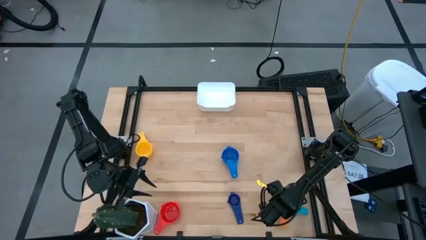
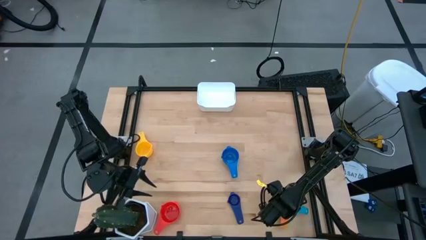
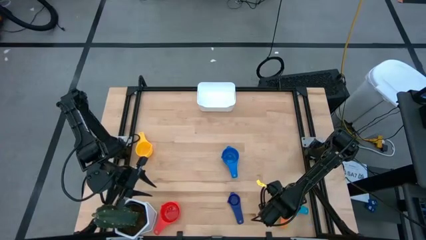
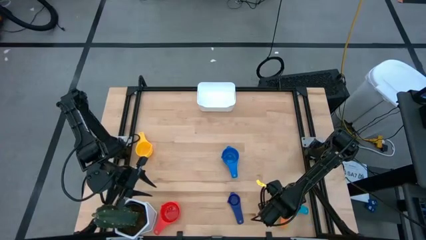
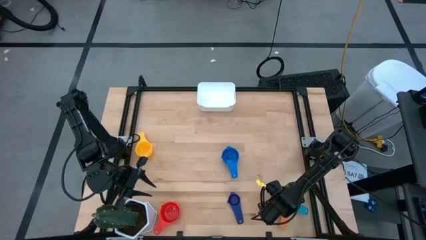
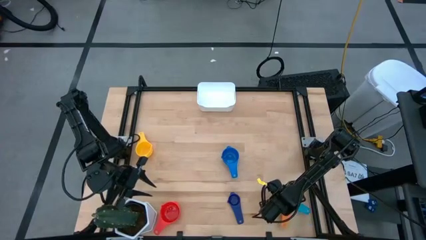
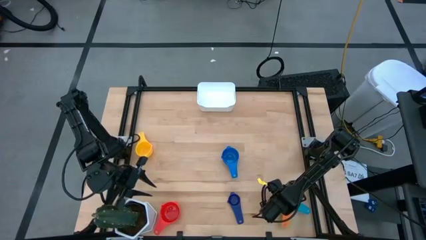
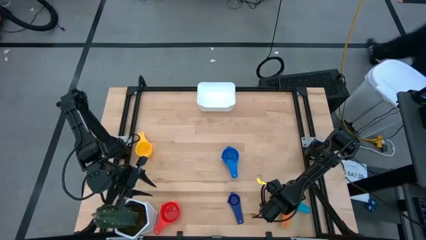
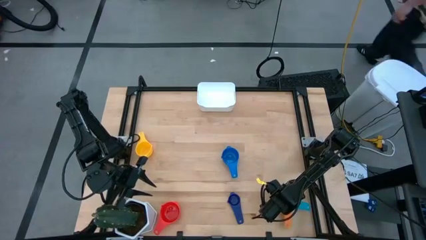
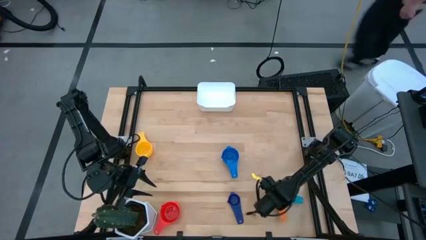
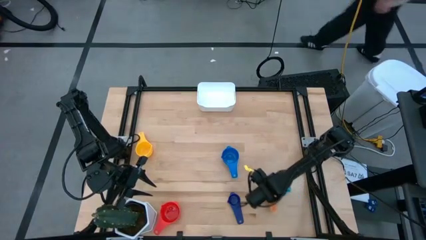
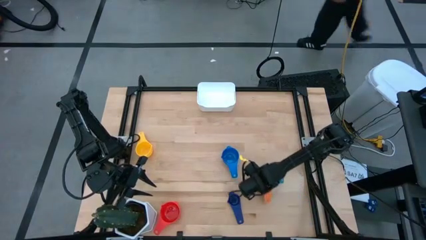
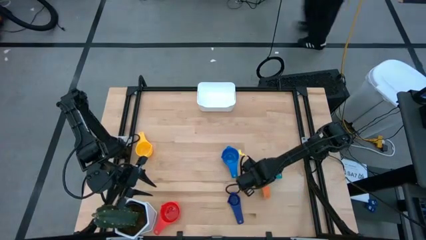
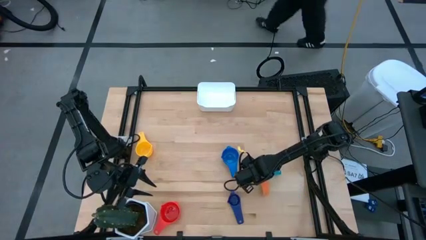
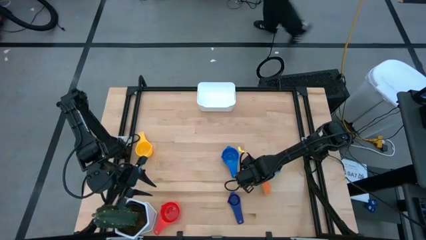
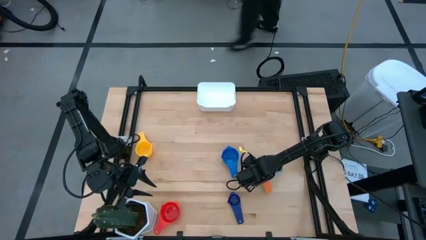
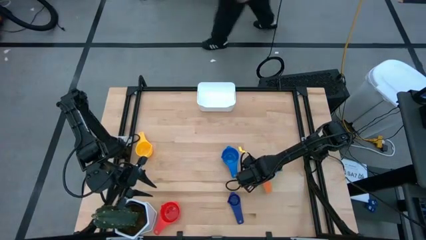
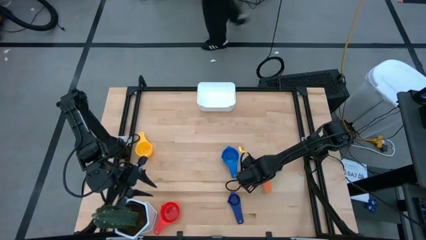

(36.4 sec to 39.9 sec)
Task: Nest measuring cups in basket
Move the nested measuring cups to the middle of the table

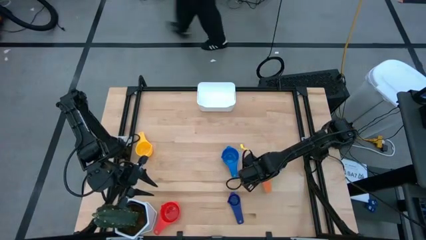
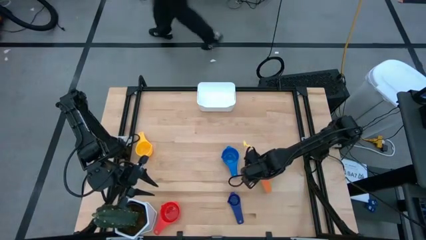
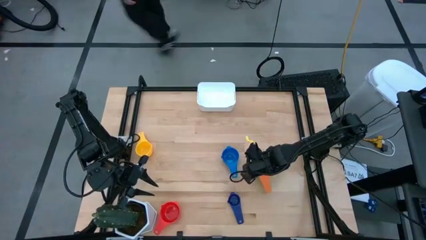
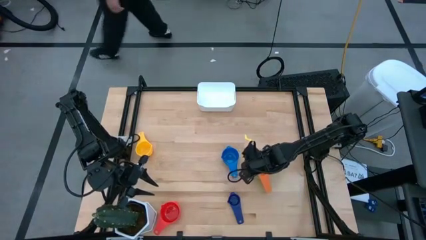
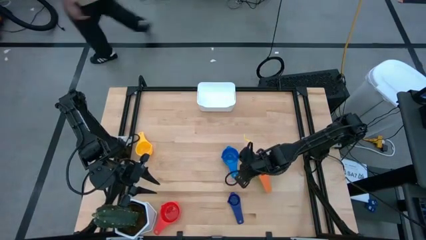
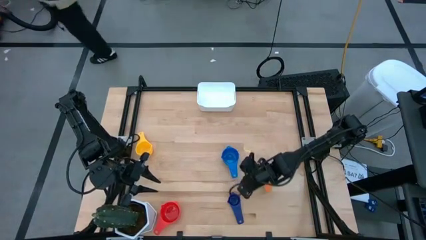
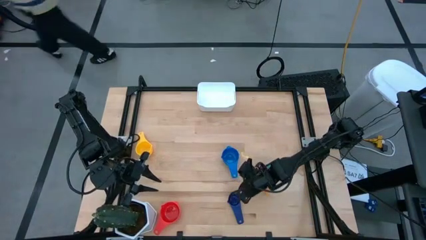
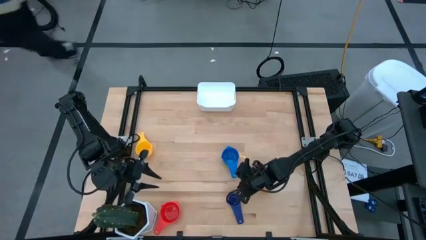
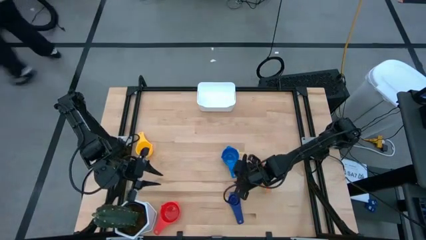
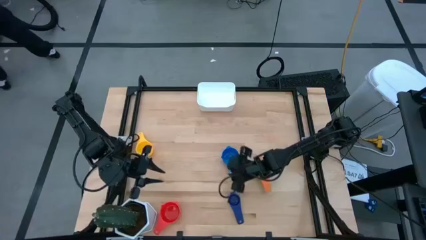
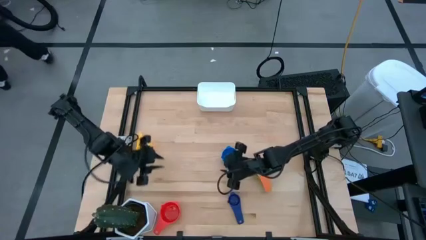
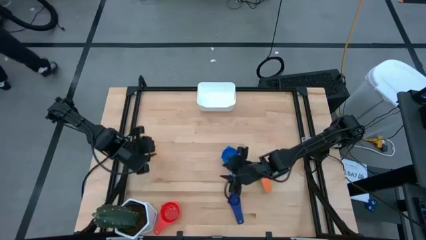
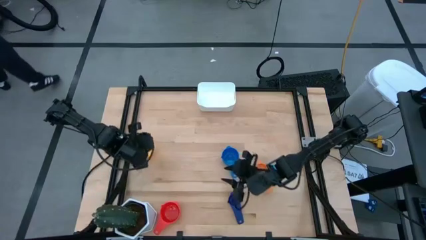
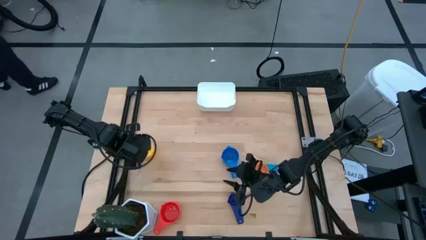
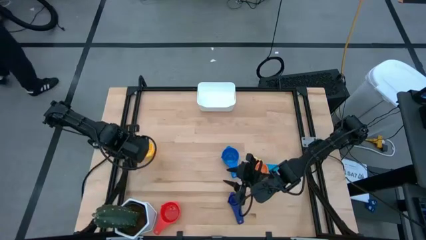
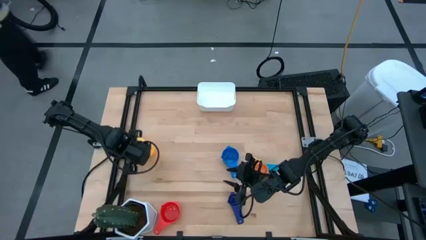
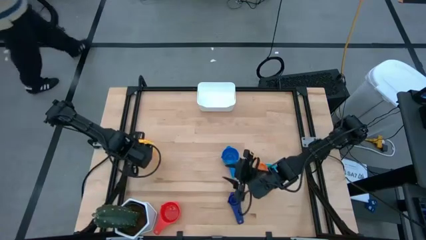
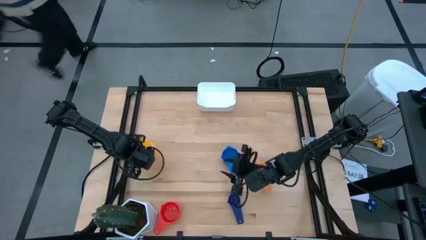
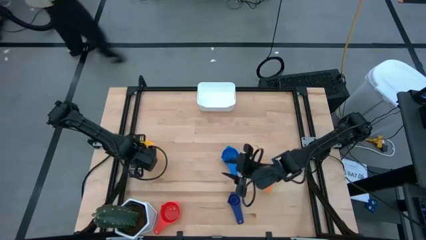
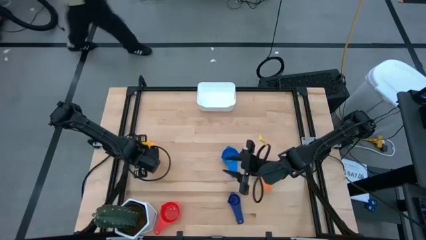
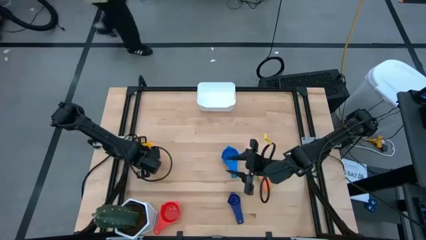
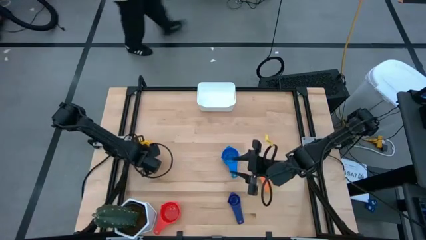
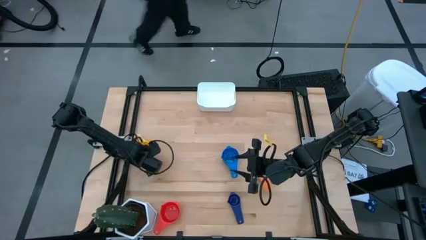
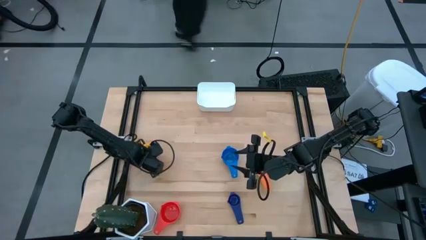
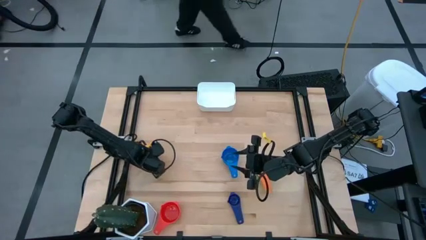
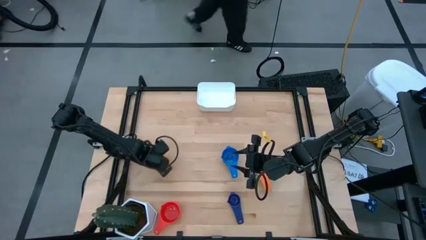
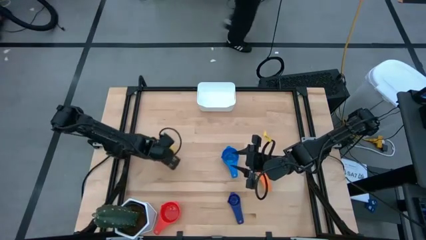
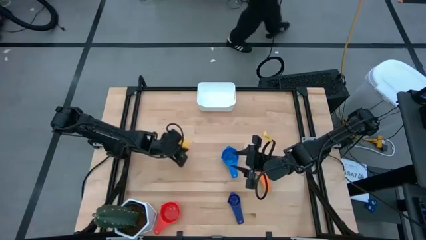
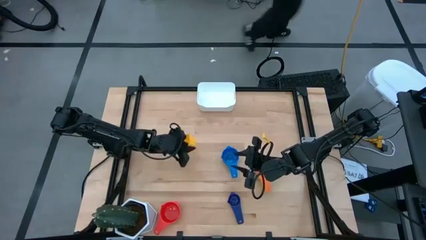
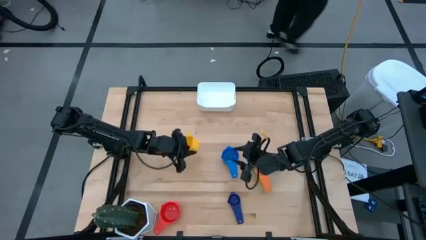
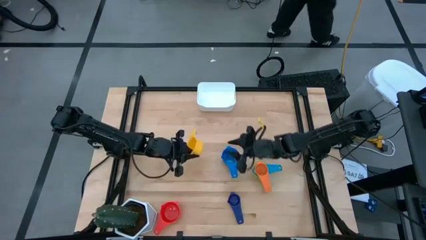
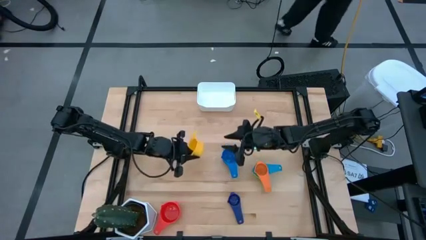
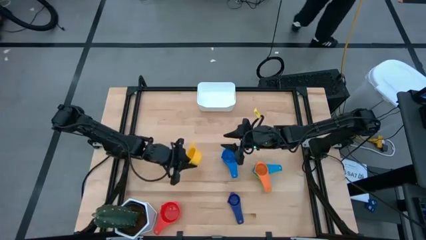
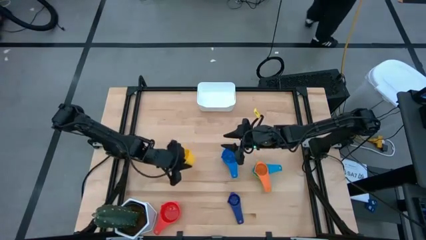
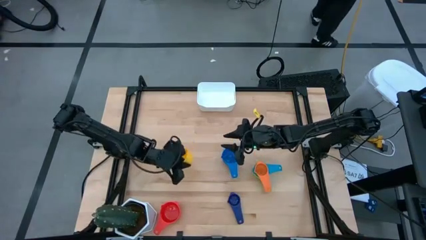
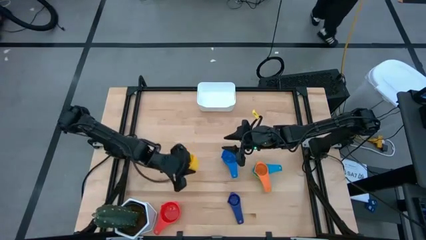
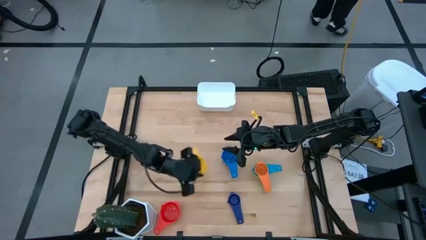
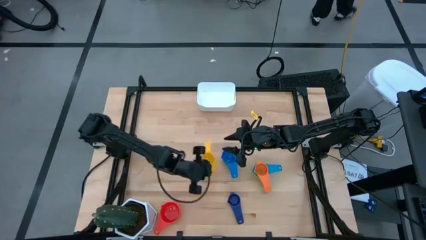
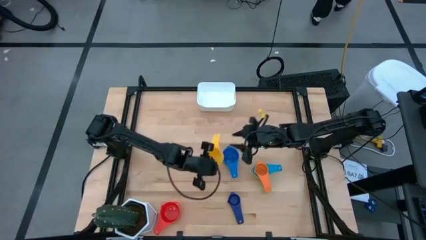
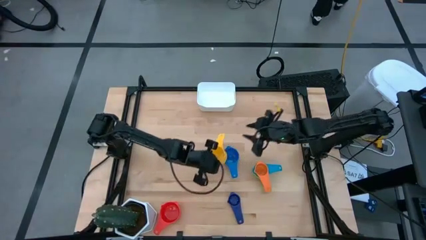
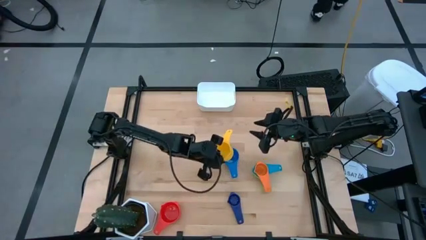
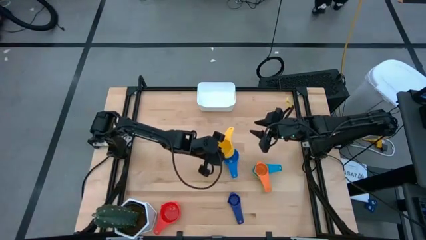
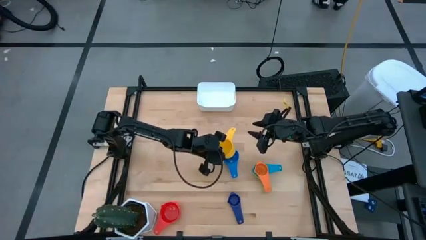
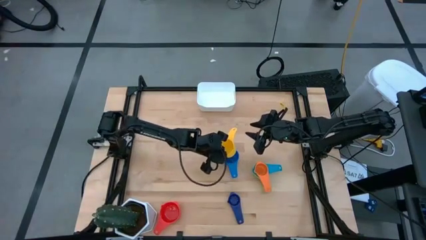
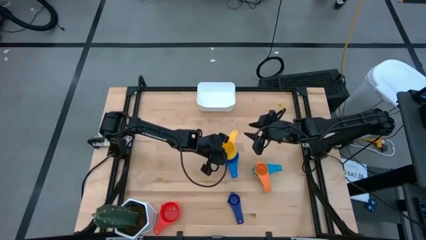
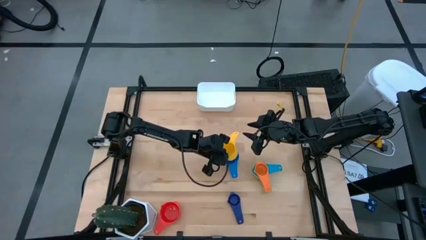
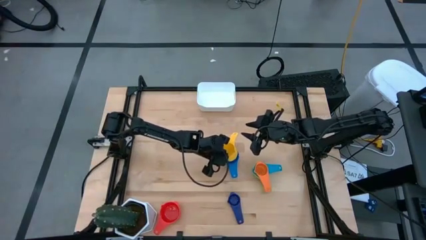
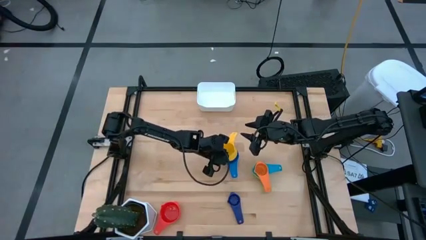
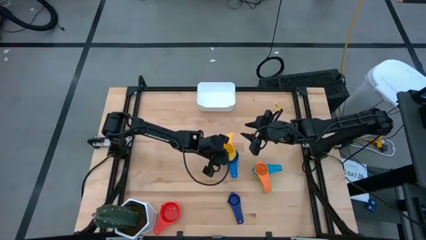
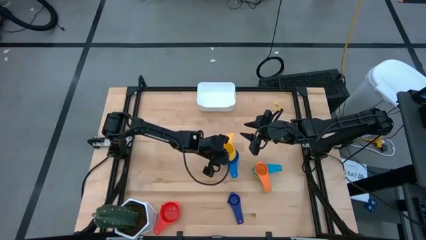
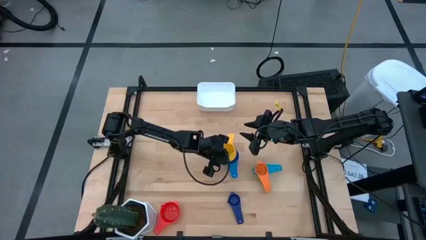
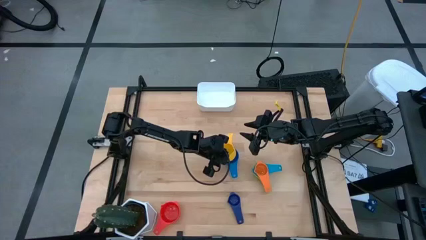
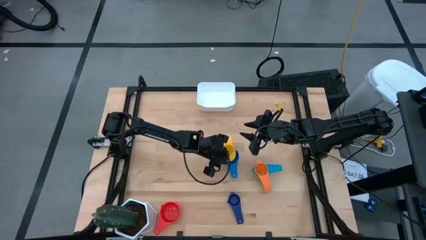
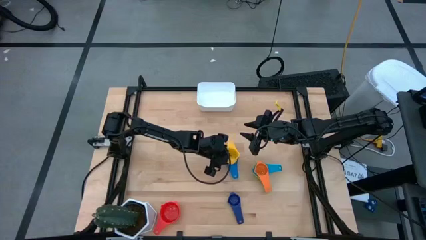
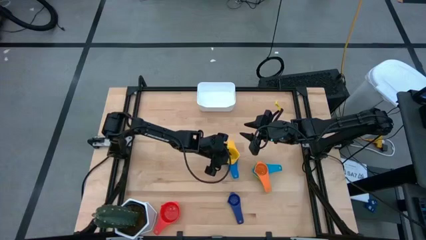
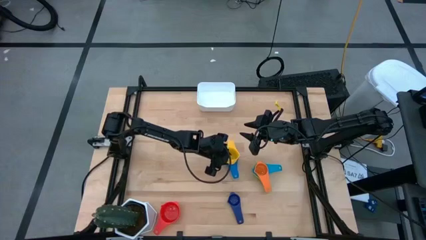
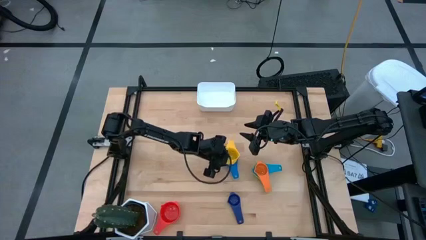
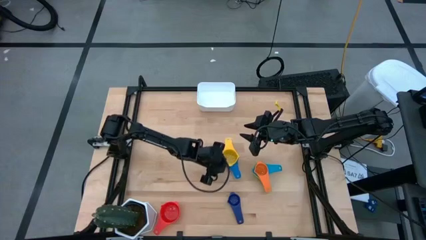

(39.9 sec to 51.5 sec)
Stack the yellow measuring cup on top of the blue measuring cup
